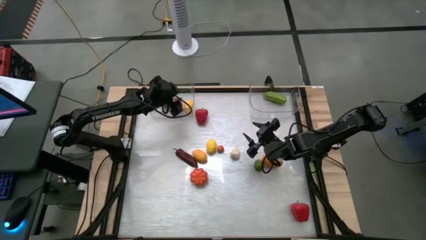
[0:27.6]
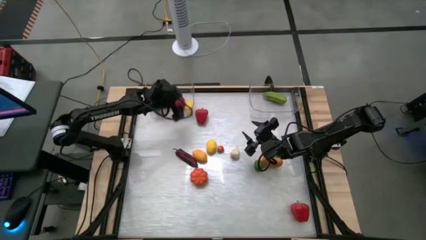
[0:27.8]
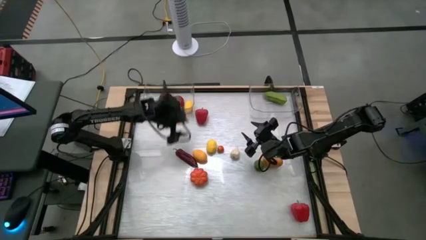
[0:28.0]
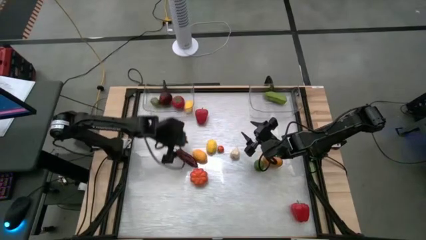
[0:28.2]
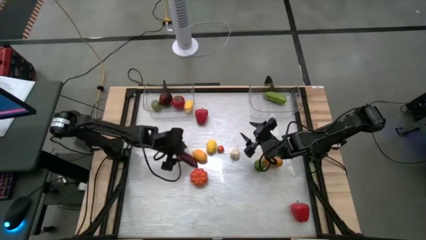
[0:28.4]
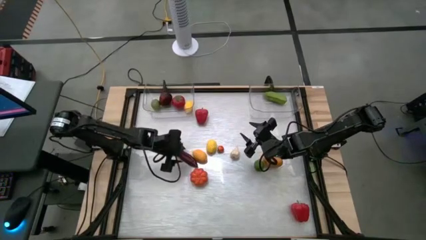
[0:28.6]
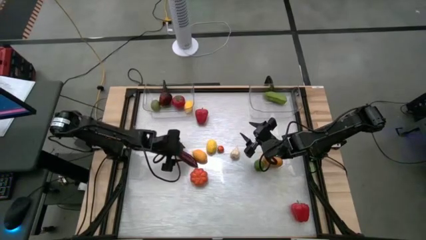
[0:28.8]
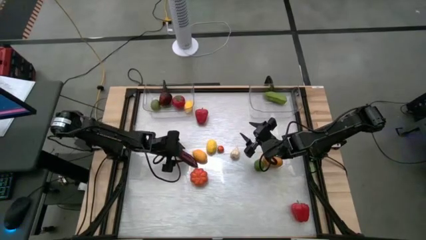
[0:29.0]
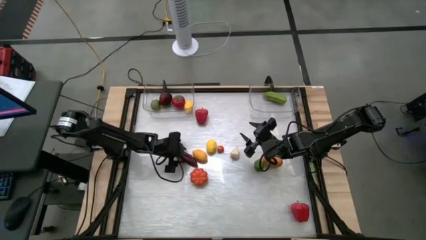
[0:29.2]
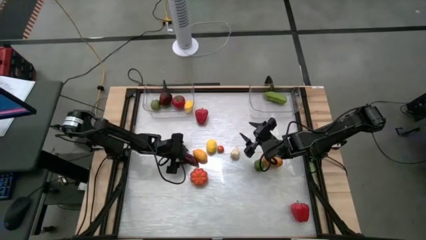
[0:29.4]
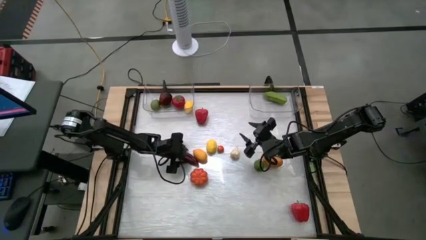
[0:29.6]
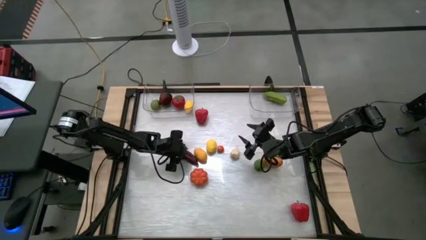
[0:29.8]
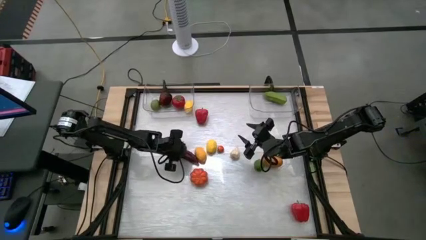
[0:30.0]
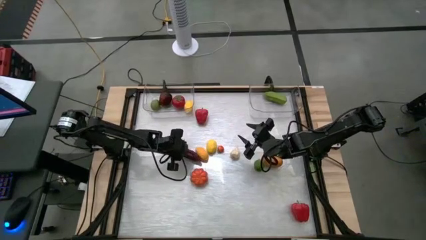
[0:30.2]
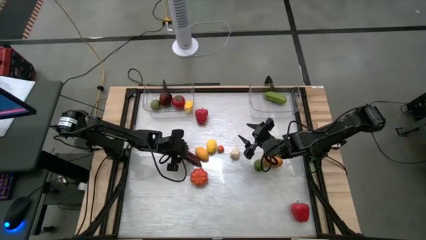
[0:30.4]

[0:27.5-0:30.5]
Task: Sort produce into baskets
Put the dark red chili pepper into the right transparent bin

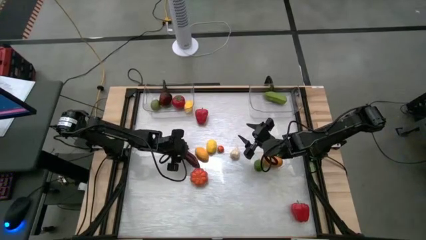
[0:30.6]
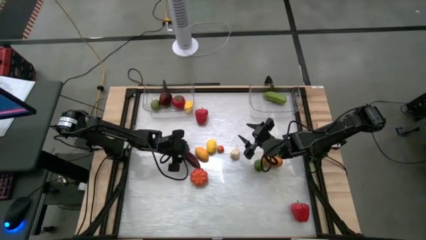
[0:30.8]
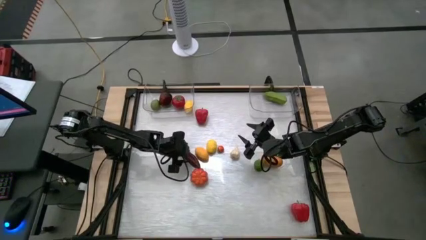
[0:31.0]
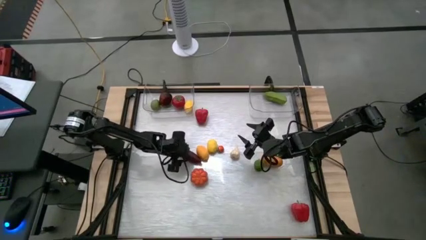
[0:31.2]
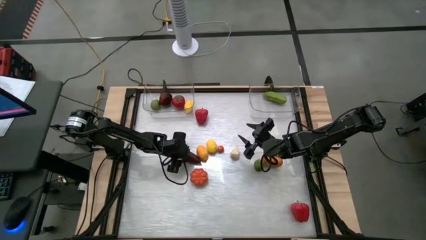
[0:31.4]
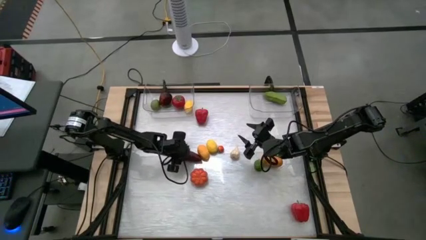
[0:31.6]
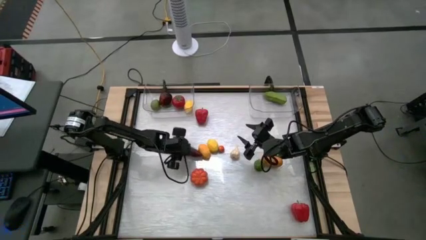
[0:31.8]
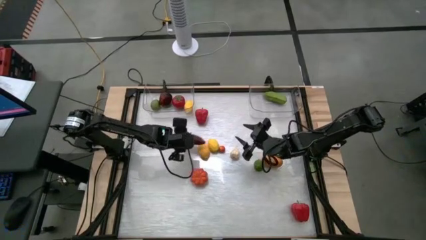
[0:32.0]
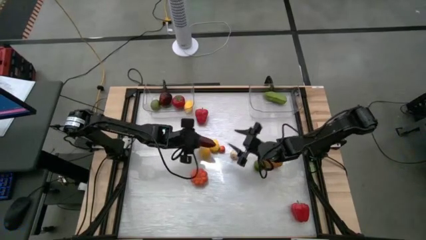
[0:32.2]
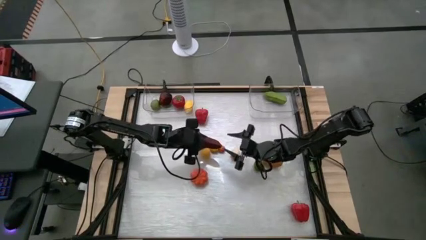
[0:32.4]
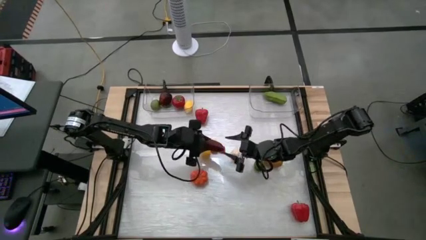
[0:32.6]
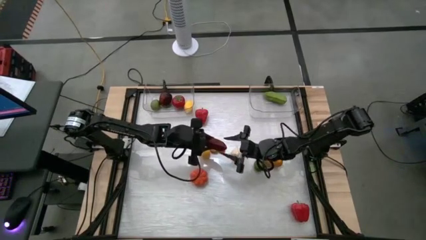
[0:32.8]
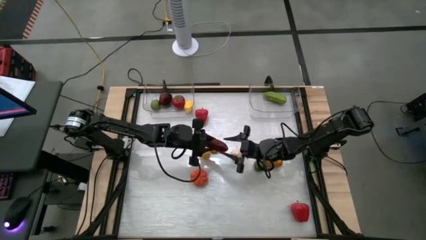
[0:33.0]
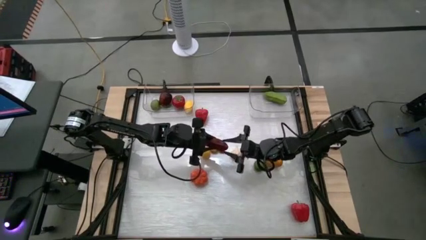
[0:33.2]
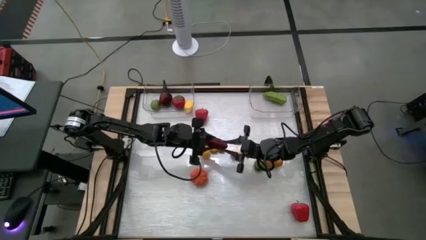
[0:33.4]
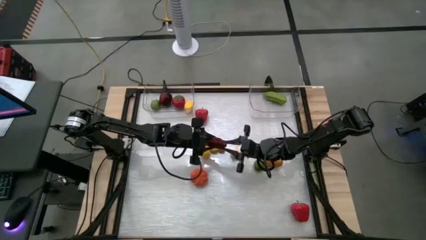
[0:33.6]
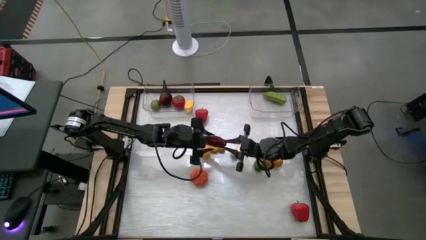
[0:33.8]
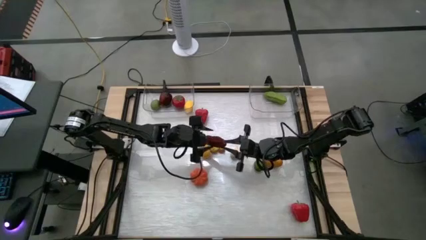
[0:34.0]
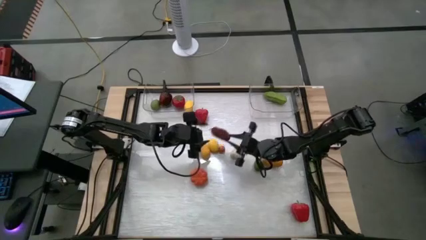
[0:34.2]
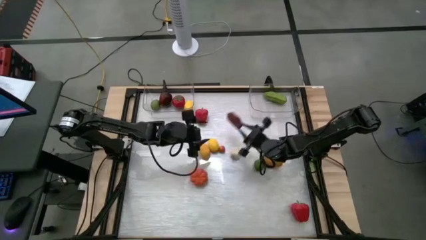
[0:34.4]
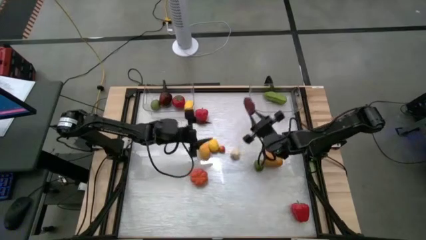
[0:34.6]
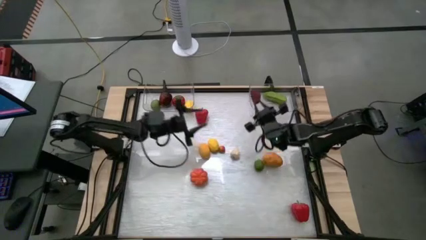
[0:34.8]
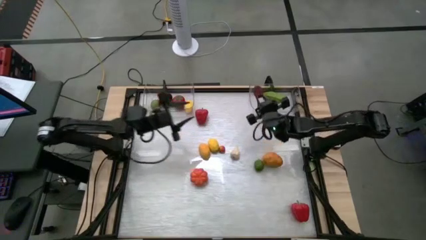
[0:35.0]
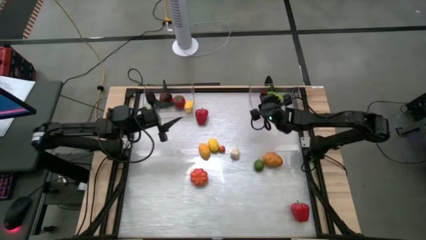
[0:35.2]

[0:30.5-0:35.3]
Put the dark red pepper into the right transparent bin

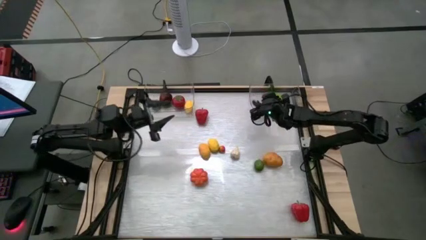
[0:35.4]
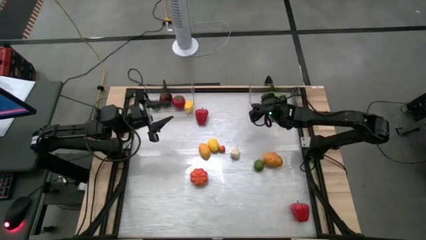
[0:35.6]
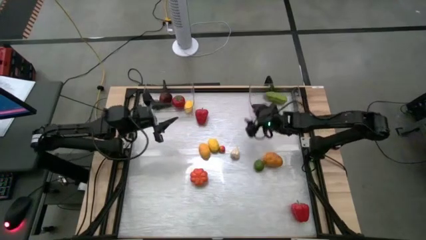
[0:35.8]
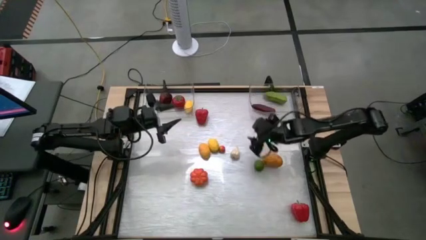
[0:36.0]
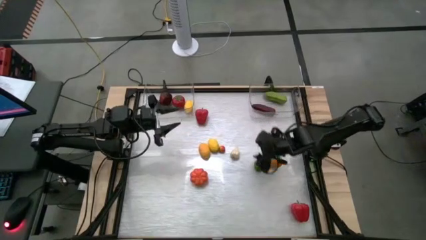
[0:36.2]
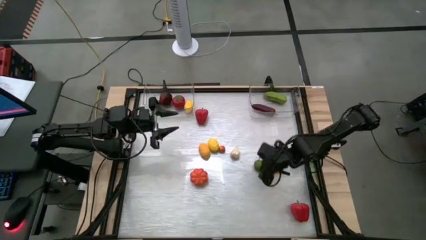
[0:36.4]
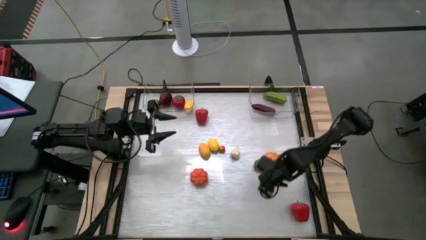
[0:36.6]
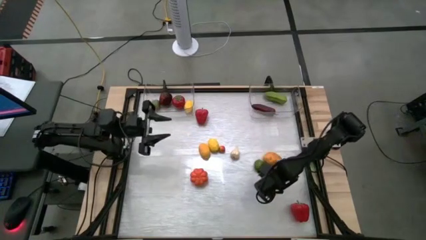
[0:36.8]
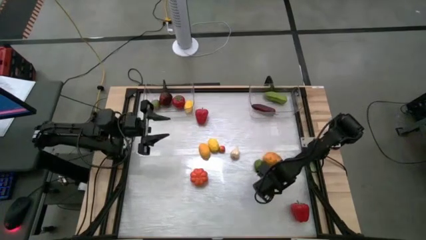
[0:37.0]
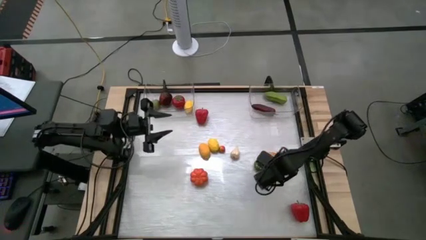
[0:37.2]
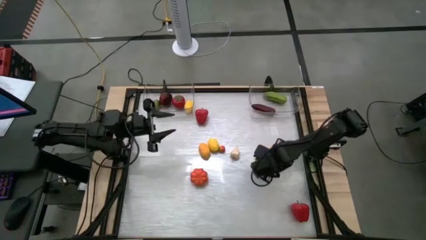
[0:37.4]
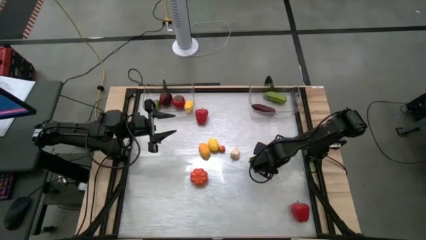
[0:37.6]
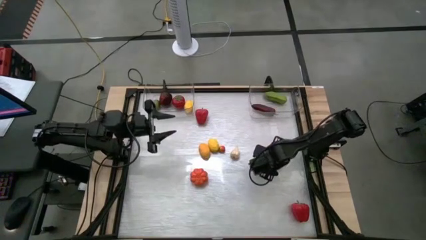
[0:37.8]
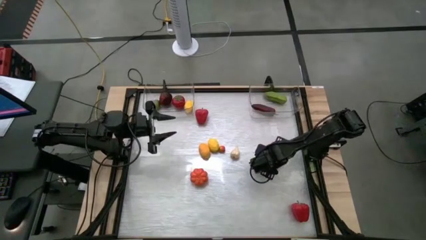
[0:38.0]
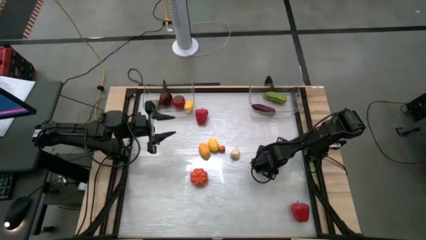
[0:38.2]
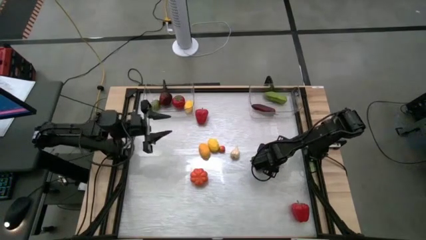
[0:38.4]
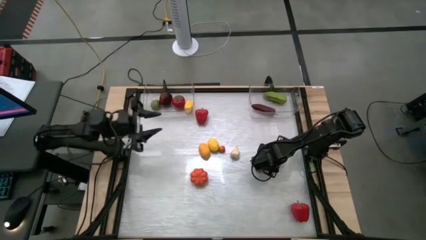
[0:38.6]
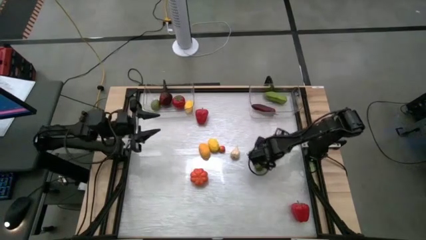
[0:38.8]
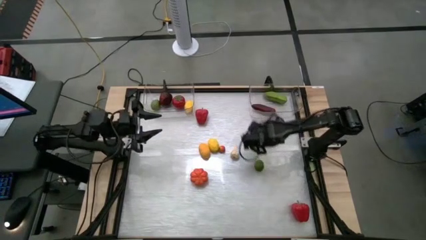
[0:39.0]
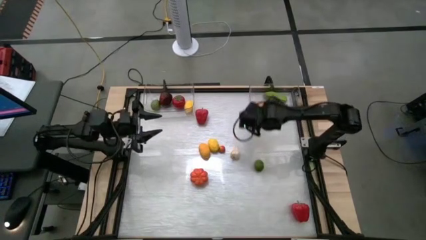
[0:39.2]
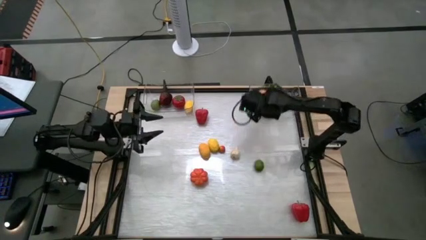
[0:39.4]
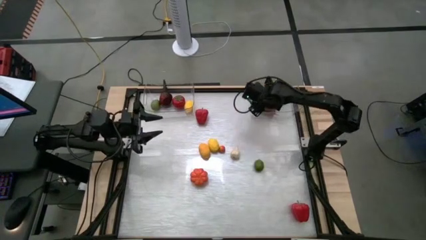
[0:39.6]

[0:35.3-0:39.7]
Put the potato into the right transparent bin

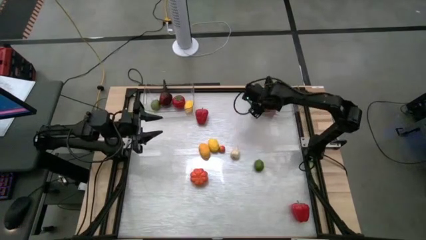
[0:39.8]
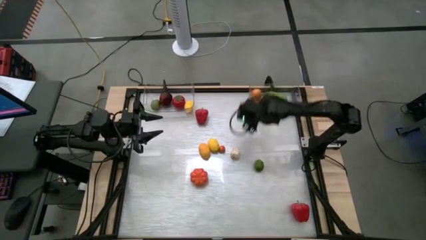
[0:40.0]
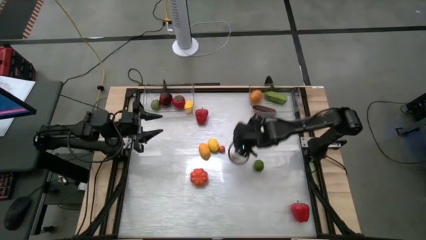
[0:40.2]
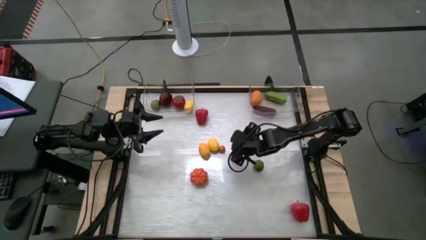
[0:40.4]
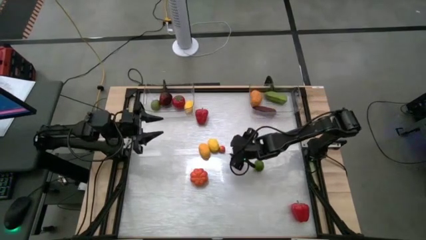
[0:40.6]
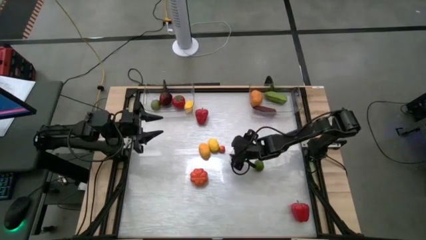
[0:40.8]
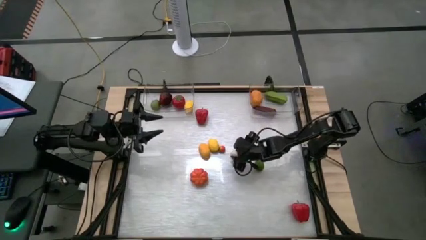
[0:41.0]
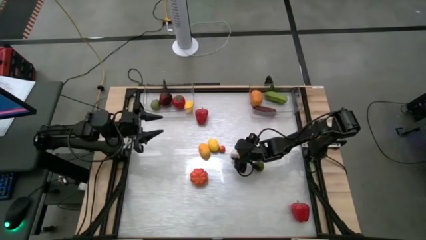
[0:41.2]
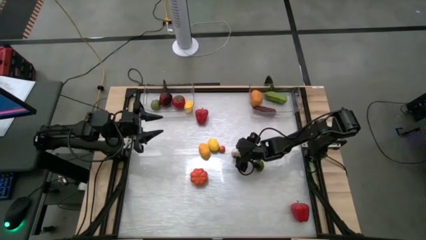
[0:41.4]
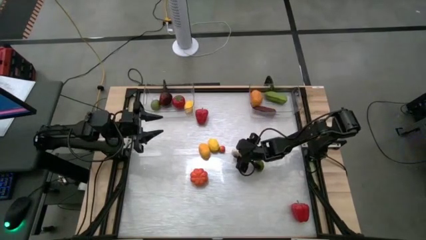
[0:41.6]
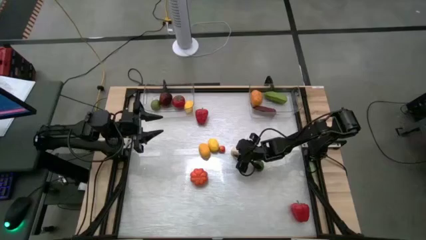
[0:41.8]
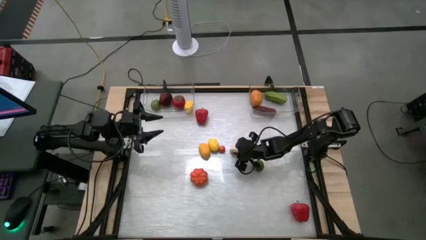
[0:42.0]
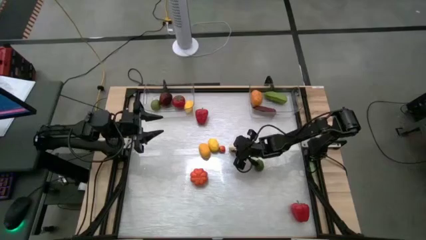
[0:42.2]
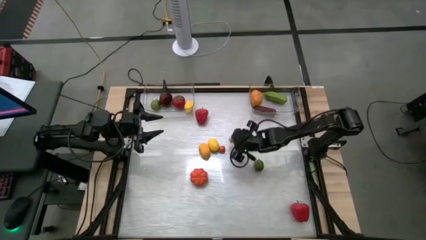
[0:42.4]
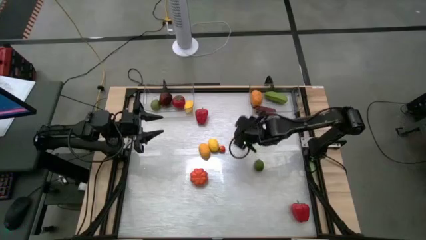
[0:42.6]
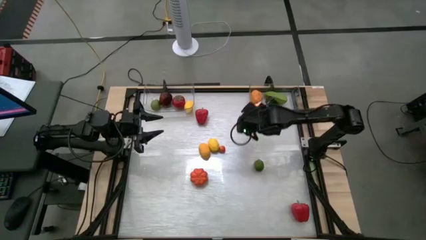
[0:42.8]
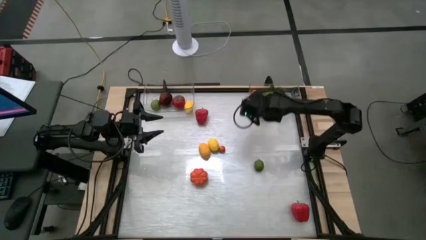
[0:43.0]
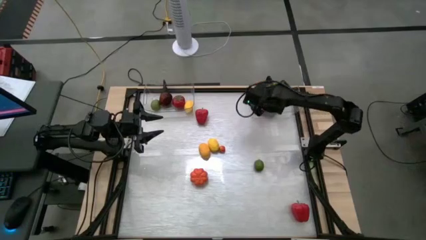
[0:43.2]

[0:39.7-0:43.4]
Put the garlic into the right transparent bin
